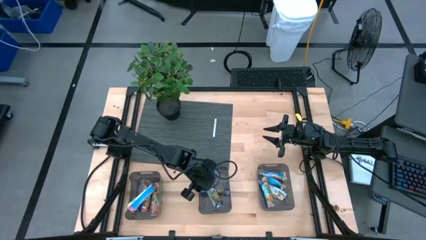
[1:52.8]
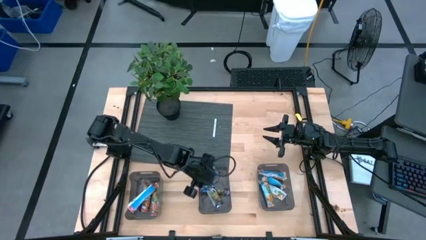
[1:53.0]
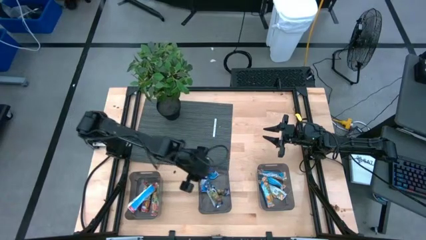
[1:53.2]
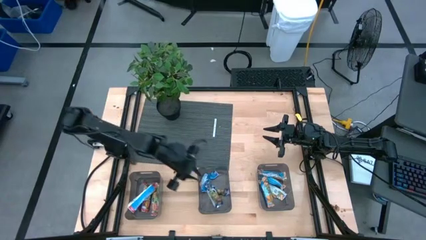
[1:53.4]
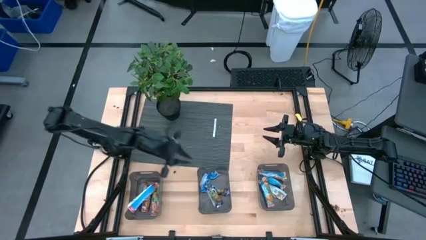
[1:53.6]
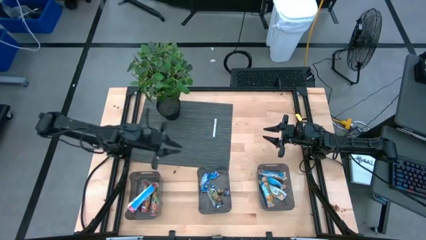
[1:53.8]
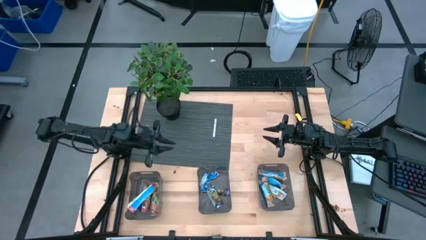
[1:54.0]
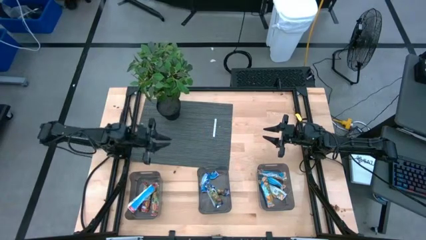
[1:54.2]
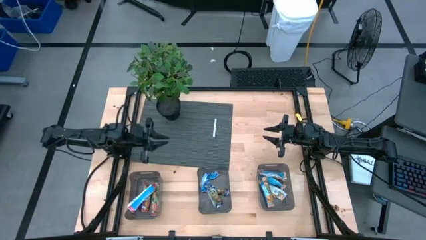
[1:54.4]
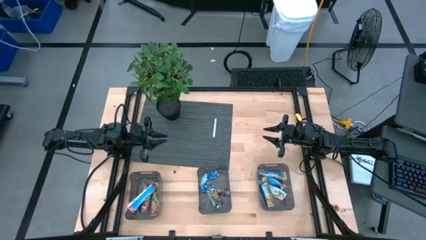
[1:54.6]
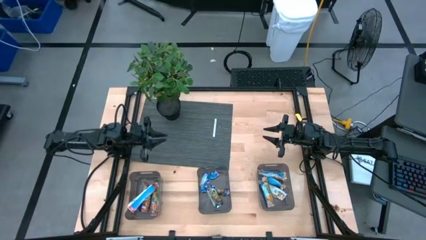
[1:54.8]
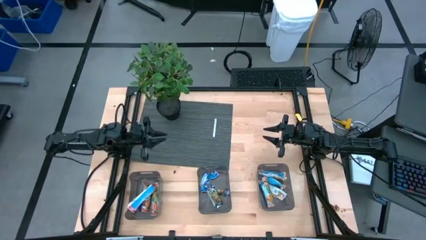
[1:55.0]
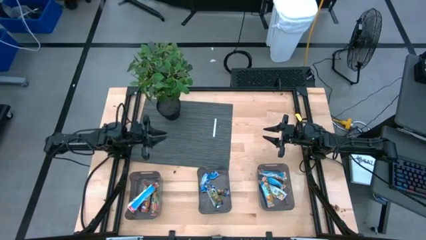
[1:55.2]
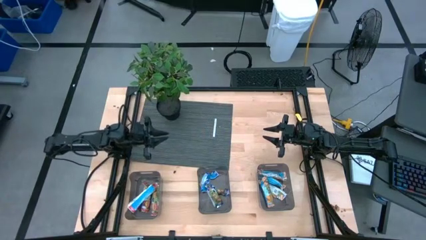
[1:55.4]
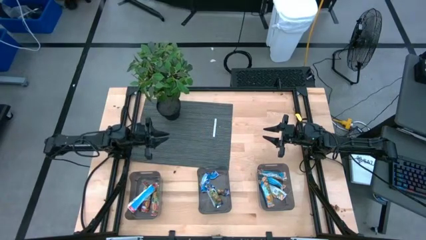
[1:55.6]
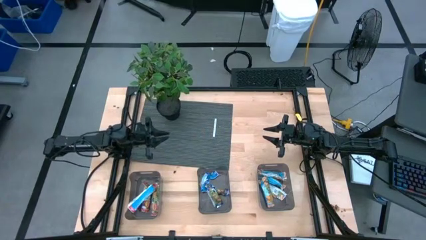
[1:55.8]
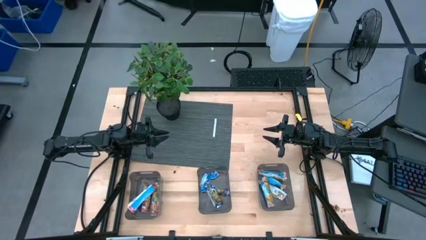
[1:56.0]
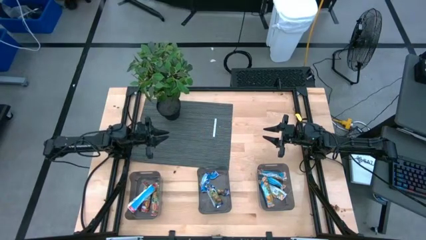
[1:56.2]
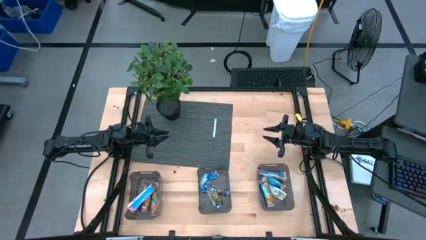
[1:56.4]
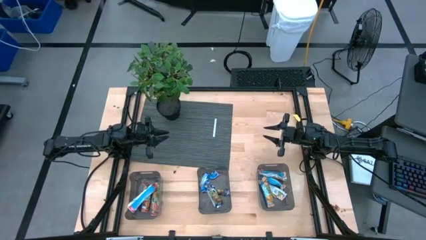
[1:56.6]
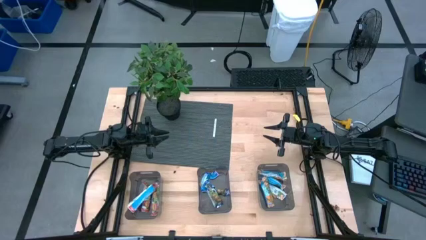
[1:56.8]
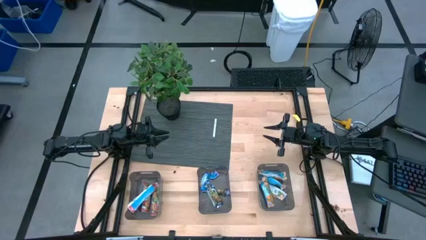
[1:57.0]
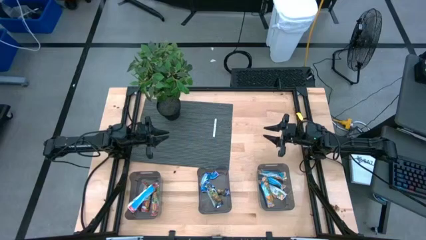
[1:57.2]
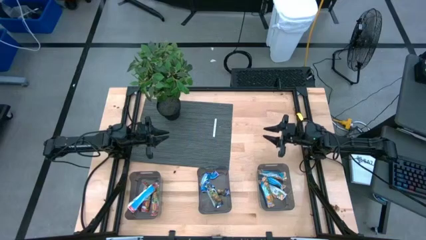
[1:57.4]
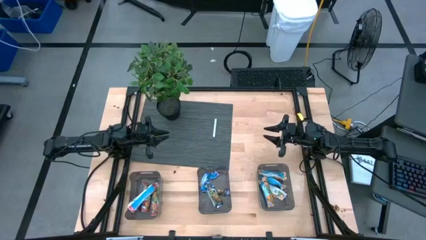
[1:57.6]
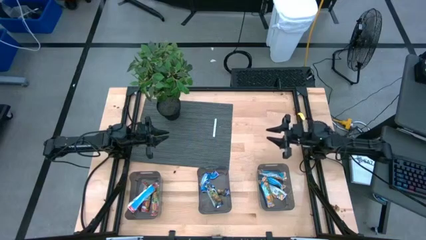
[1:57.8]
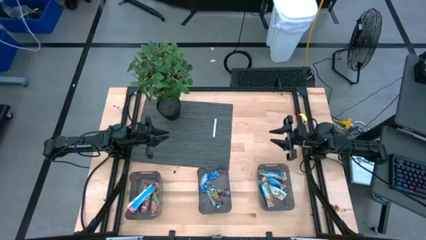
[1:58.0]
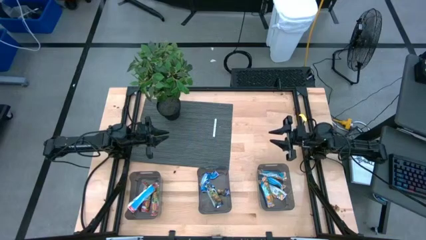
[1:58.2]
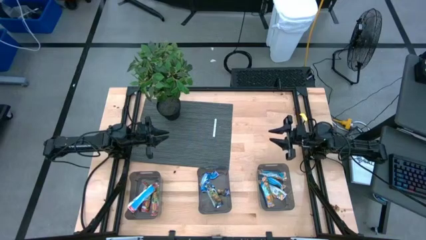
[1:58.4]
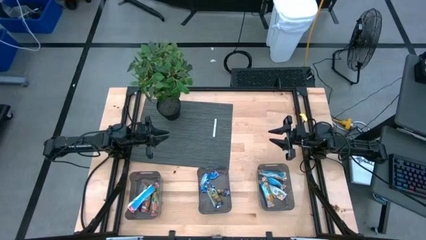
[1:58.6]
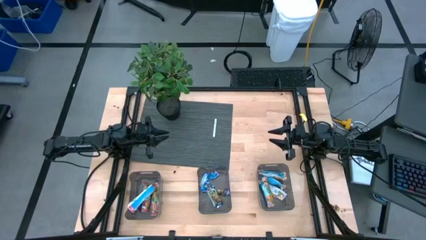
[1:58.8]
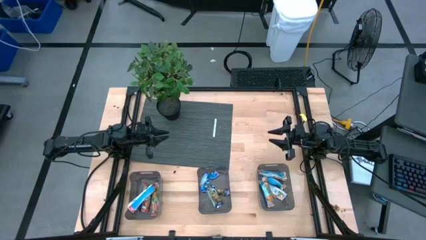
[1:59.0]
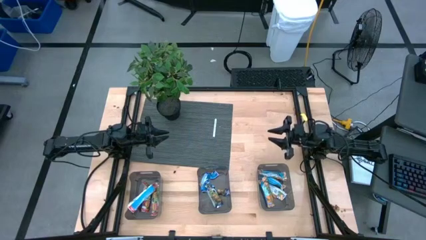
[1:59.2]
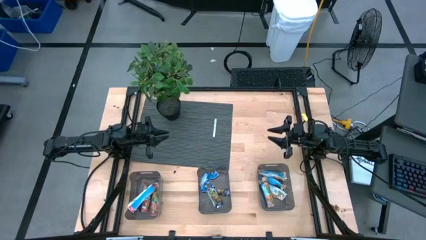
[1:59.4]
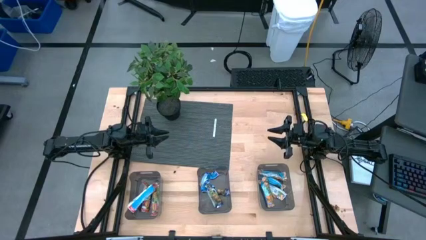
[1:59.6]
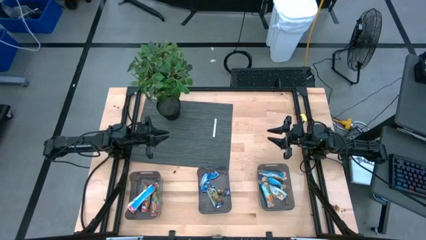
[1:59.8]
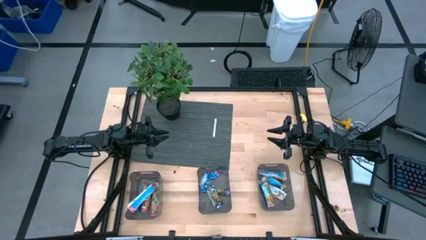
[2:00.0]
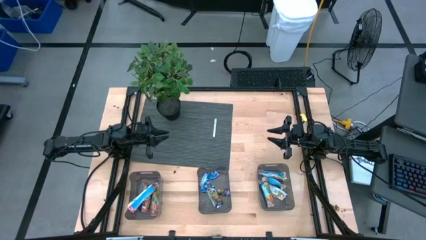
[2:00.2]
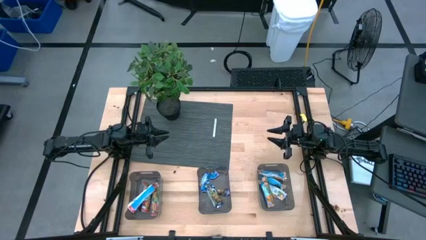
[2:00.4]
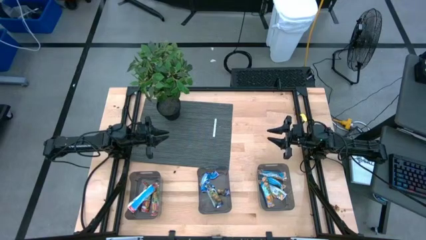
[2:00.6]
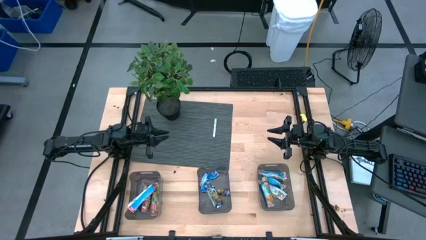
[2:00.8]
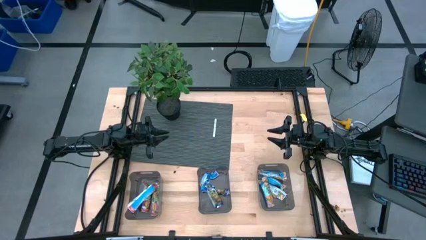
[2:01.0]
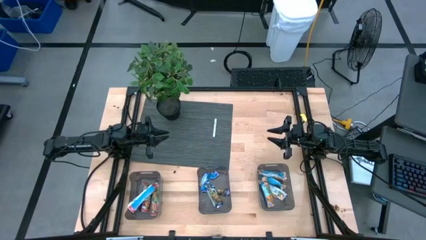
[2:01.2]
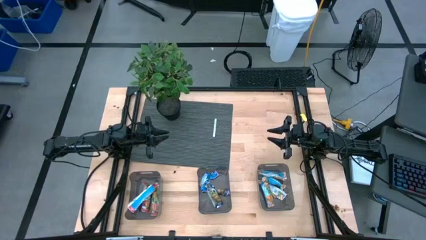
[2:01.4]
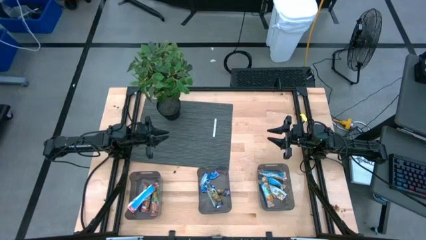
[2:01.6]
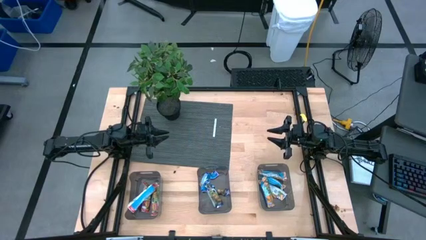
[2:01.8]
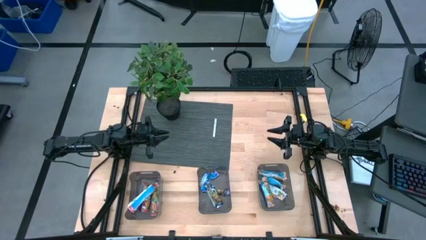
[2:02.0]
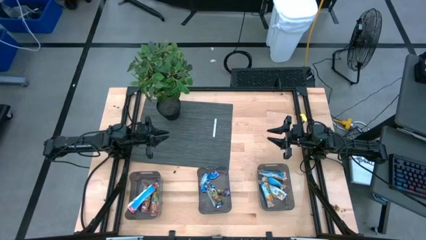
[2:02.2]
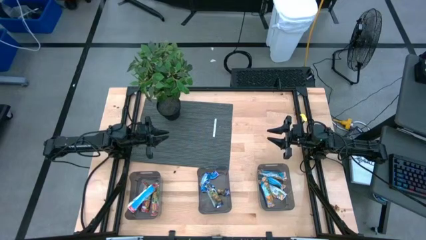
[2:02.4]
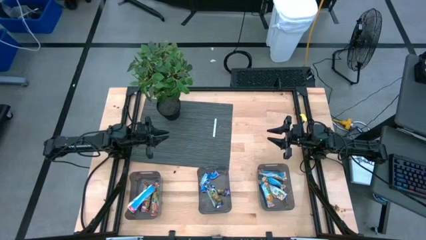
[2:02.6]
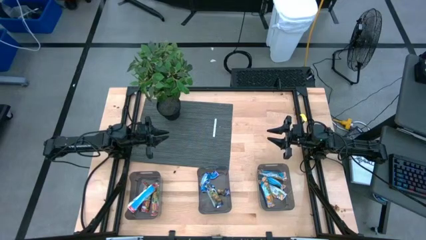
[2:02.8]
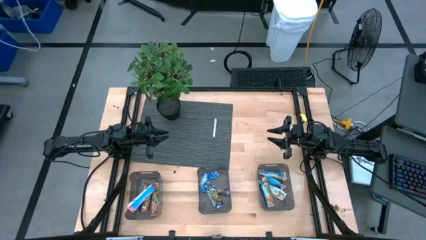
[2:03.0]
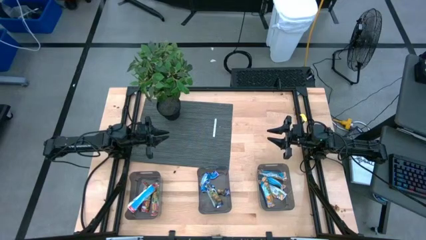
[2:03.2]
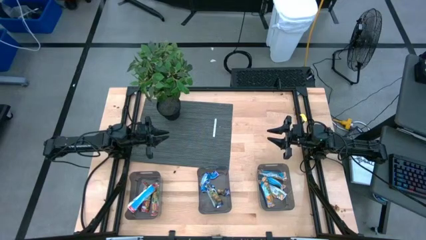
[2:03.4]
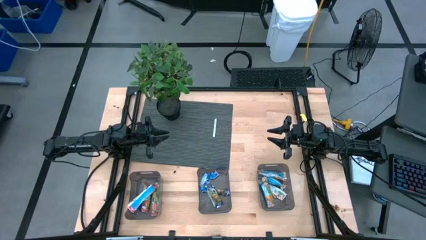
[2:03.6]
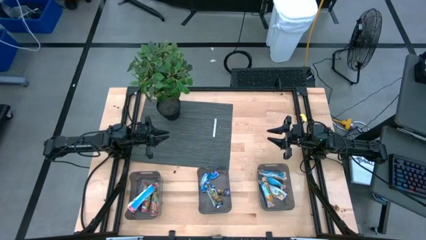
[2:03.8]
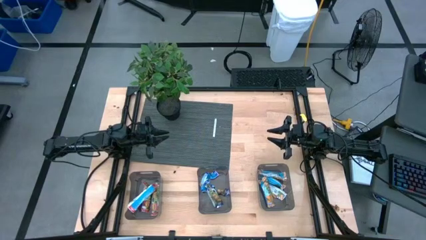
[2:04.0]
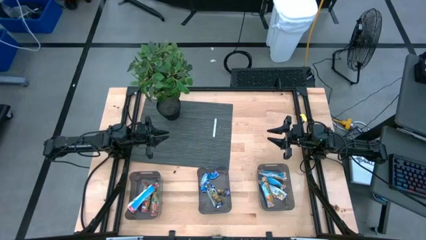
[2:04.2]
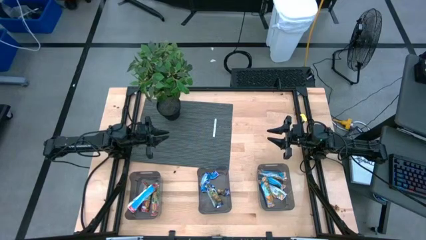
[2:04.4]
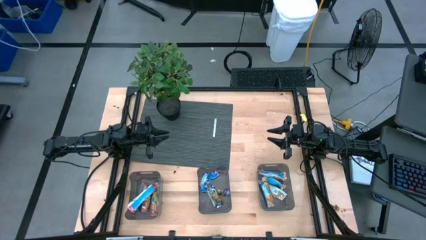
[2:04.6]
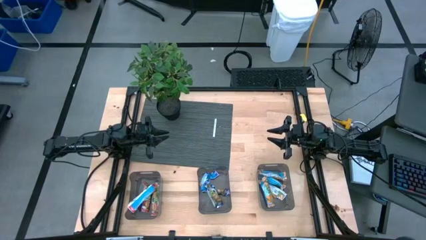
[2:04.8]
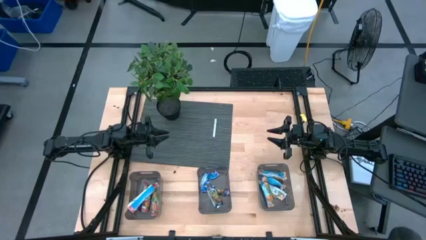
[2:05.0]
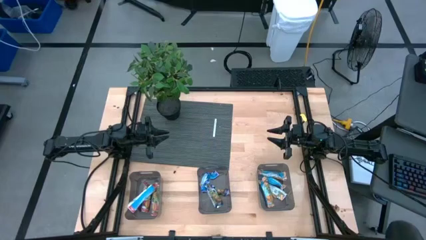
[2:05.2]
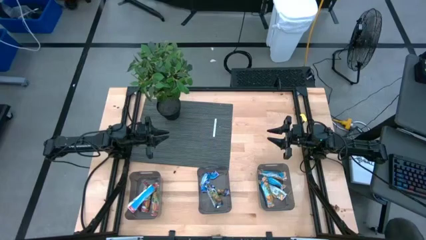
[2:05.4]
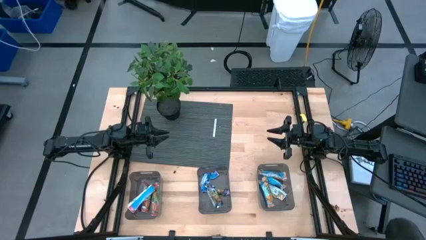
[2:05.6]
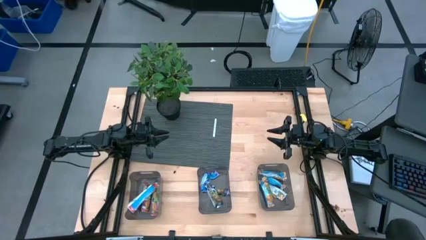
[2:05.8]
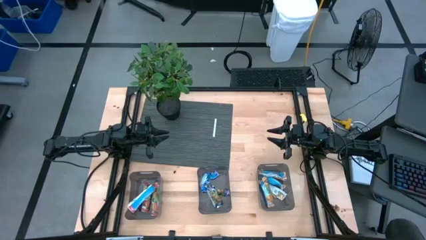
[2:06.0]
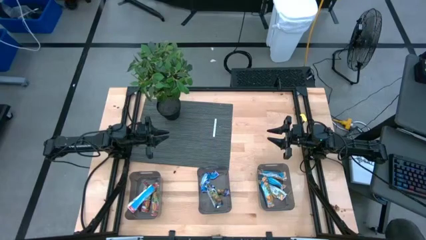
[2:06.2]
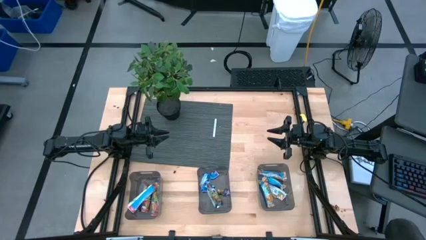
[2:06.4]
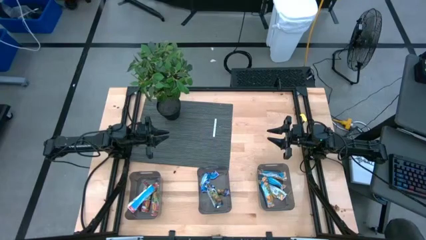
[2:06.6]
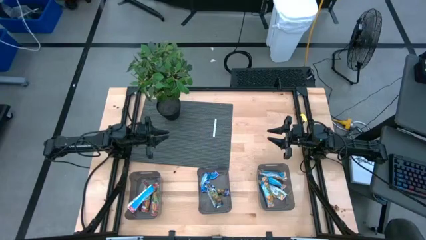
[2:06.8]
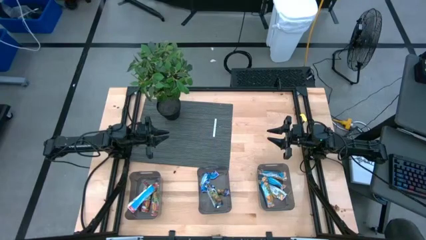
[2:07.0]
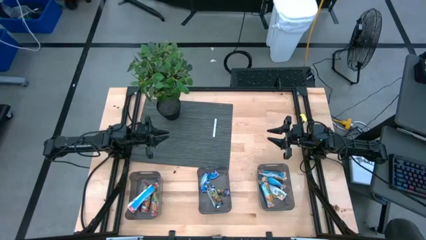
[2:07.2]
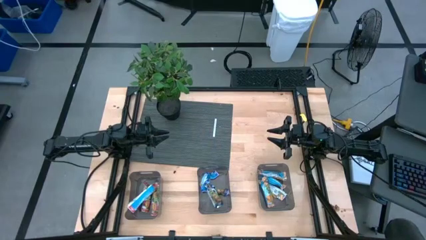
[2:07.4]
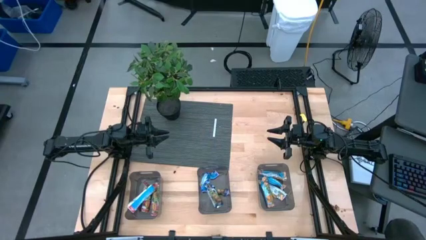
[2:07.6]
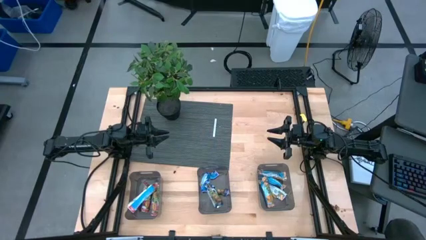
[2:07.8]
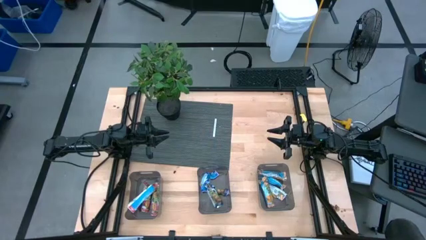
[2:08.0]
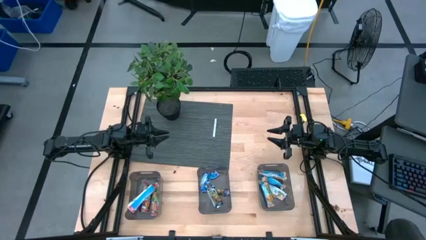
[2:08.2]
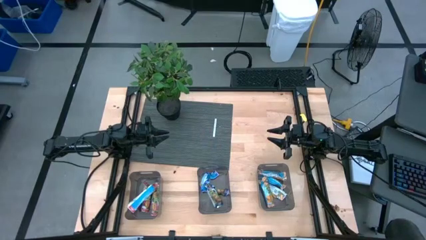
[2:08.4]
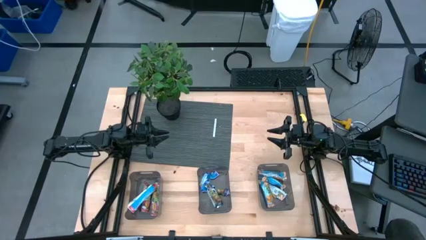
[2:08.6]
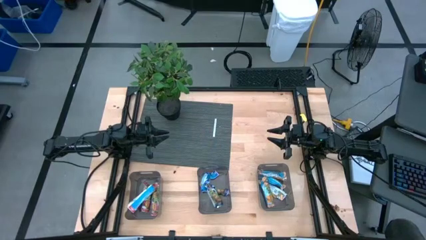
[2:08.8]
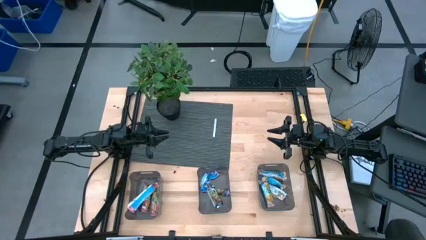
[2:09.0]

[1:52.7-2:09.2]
Task: Pick and place Granola Bars by type
Return to Home Position
